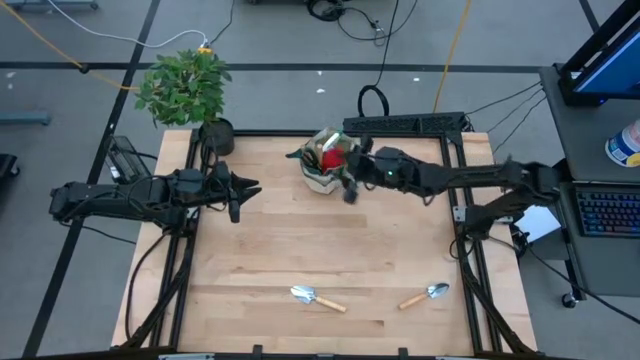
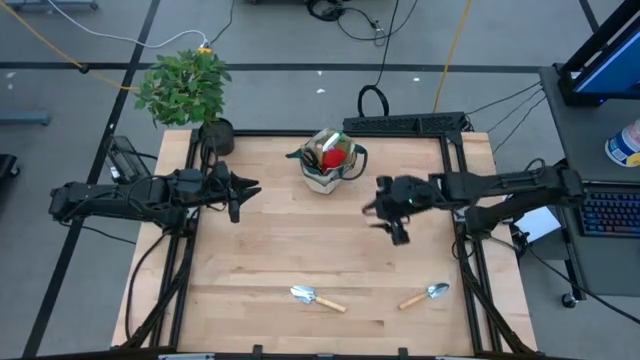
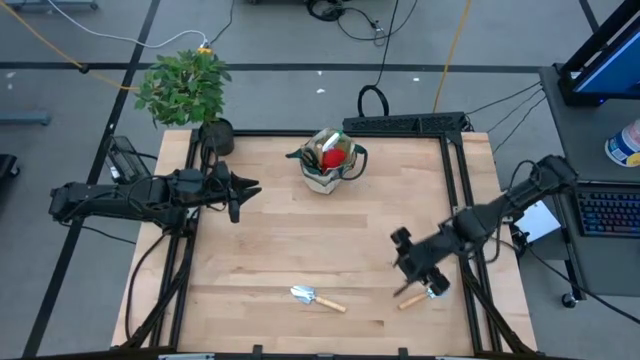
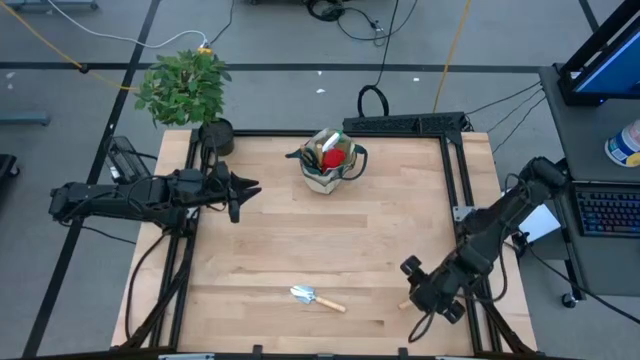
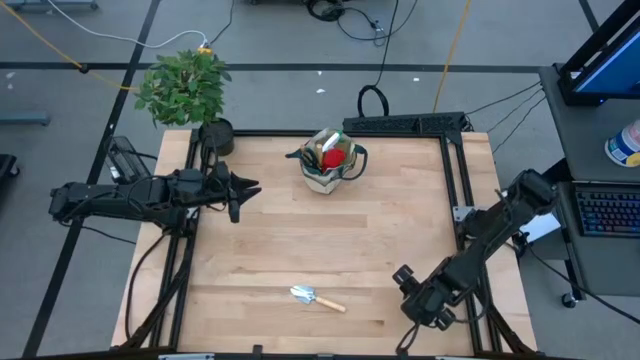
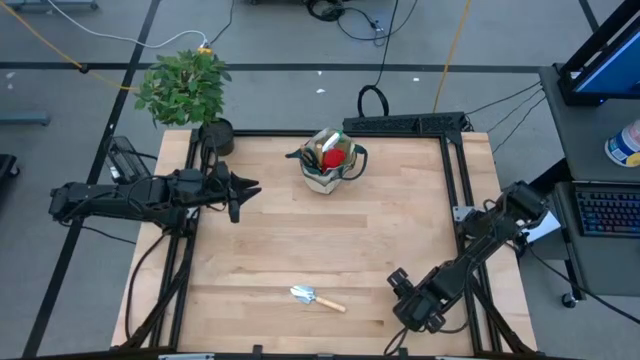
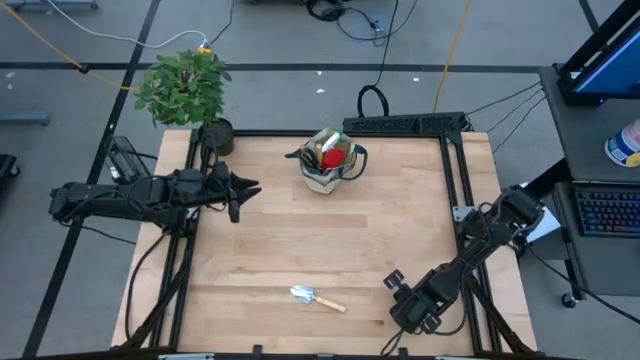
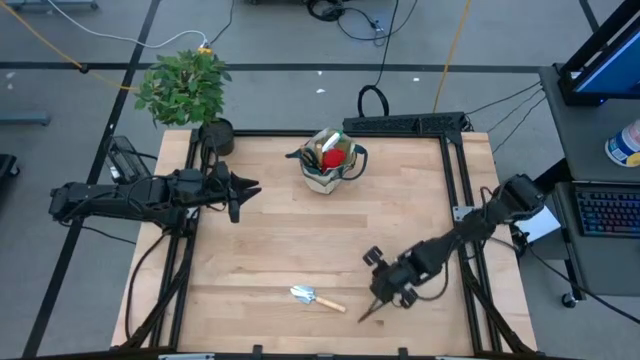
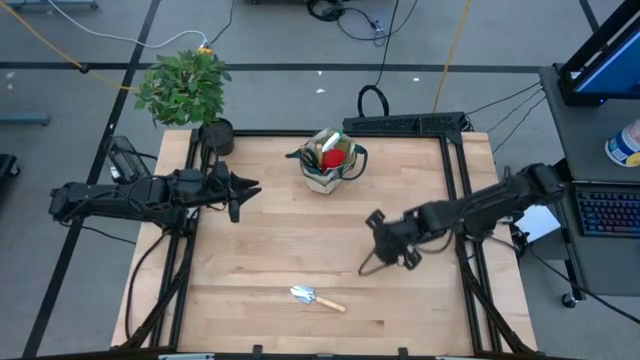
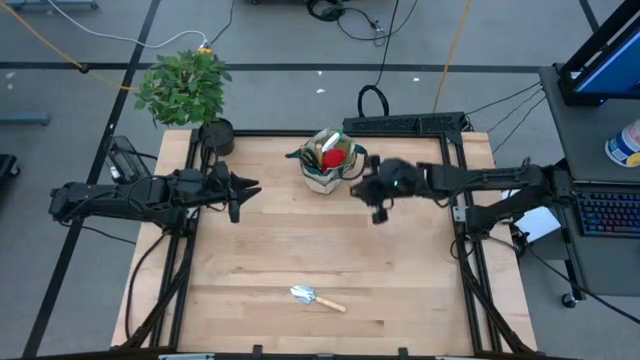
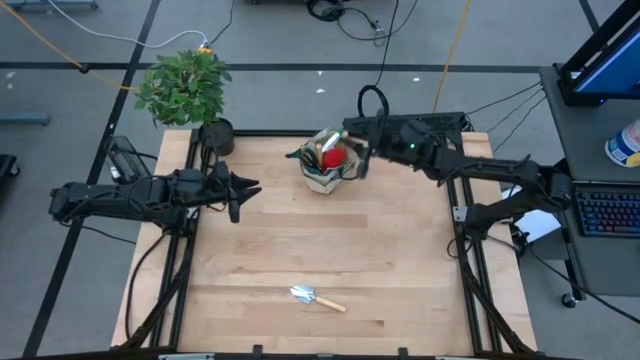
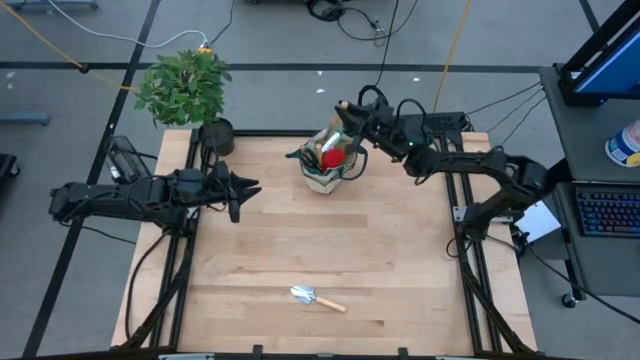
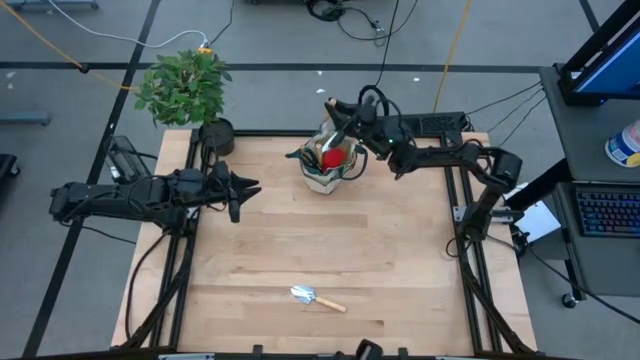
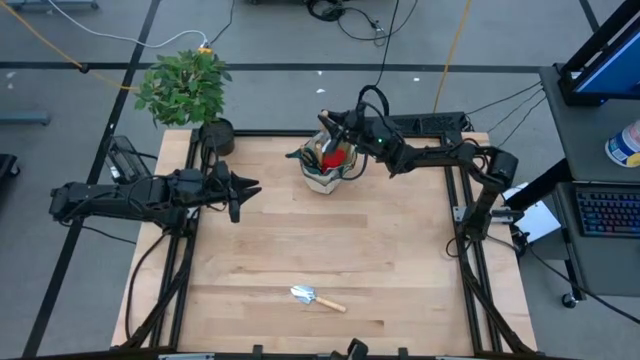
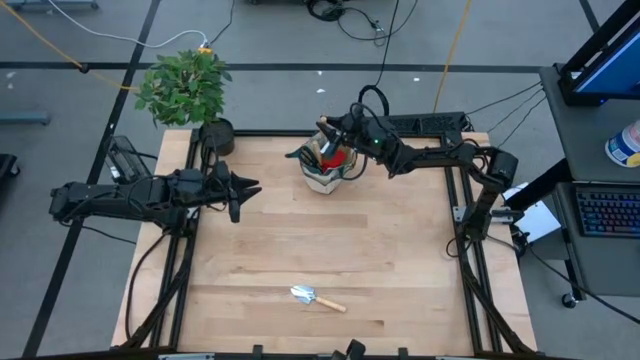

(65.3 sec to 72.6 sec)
Task: Pick & Place Garden tools in Gardening bag
Put the right hand trowel into the gardening tool bag

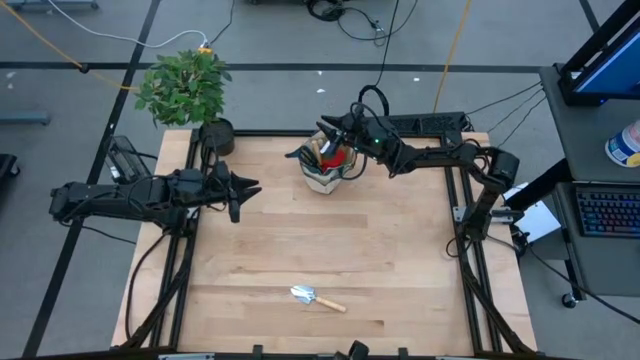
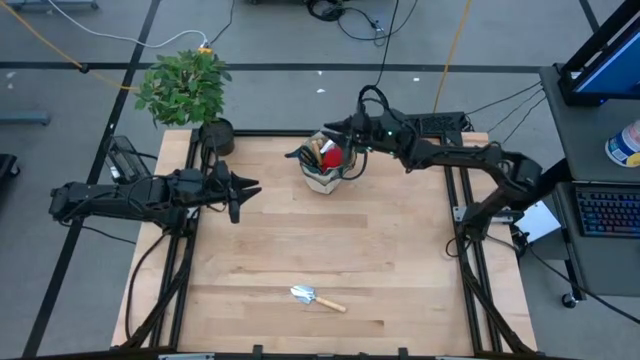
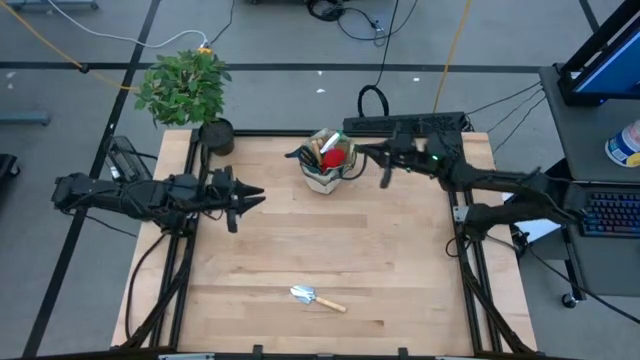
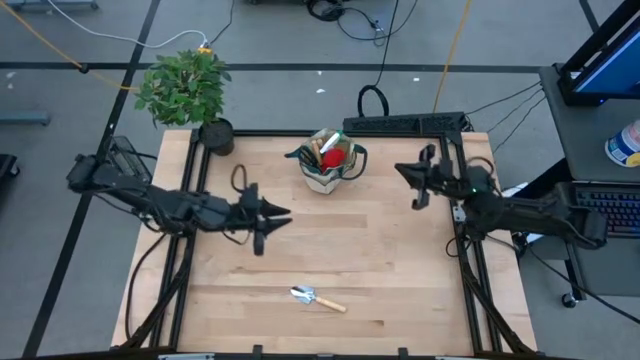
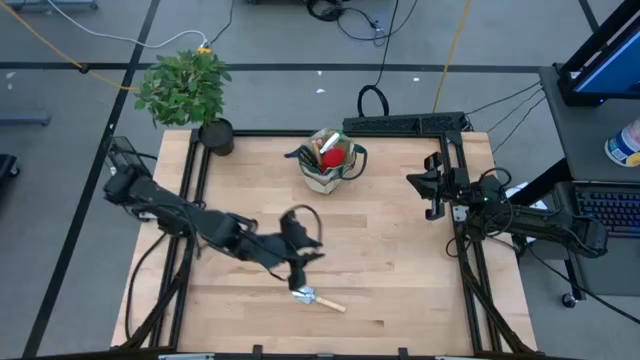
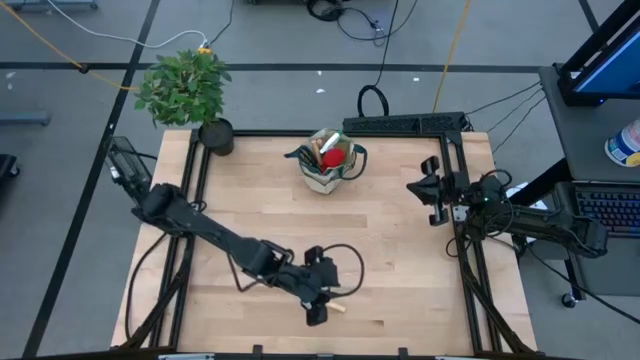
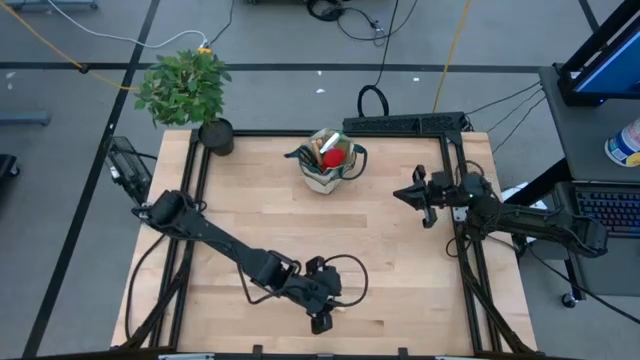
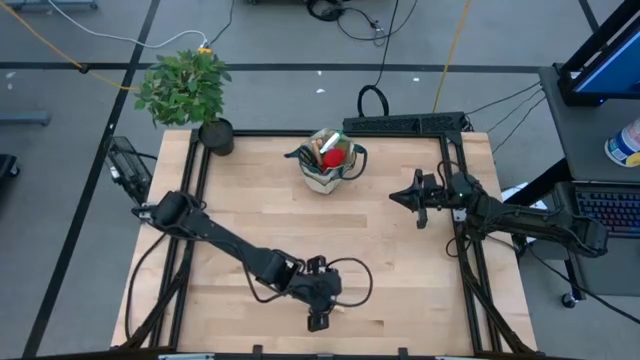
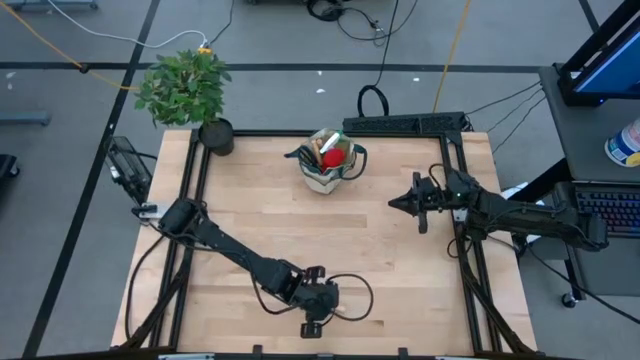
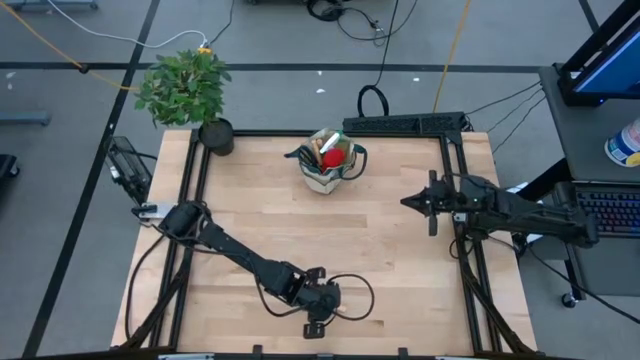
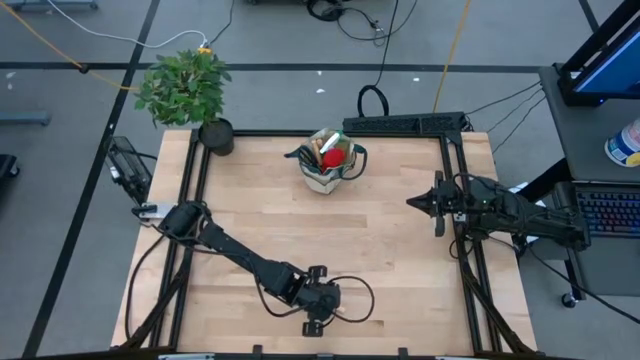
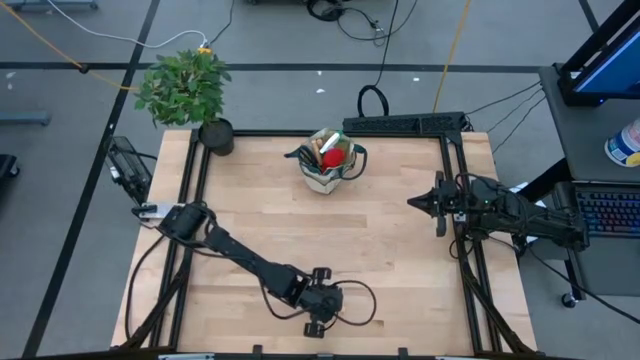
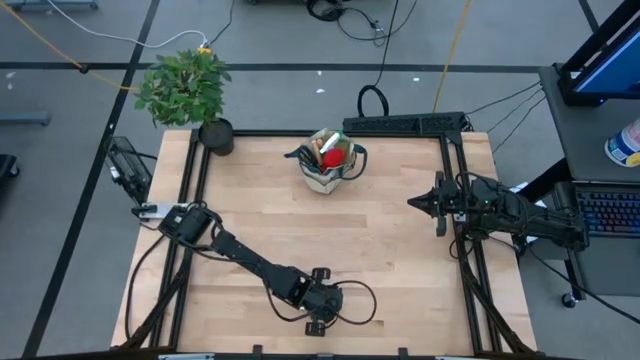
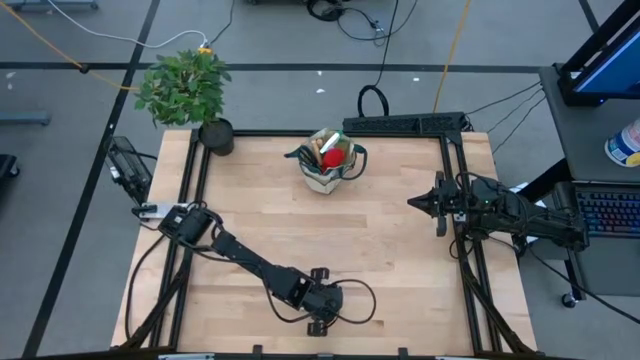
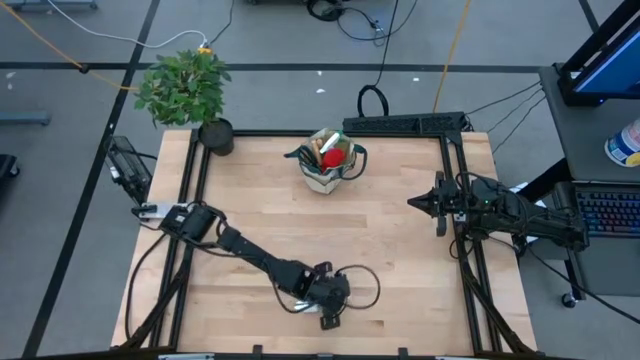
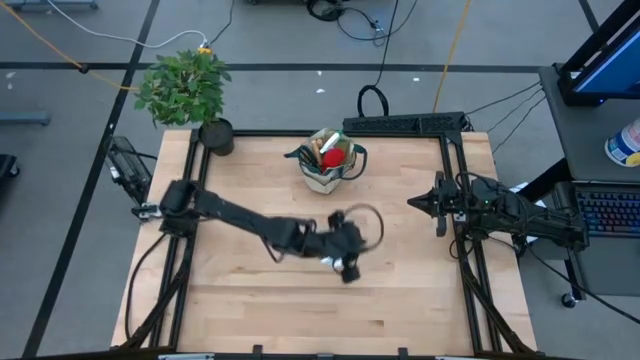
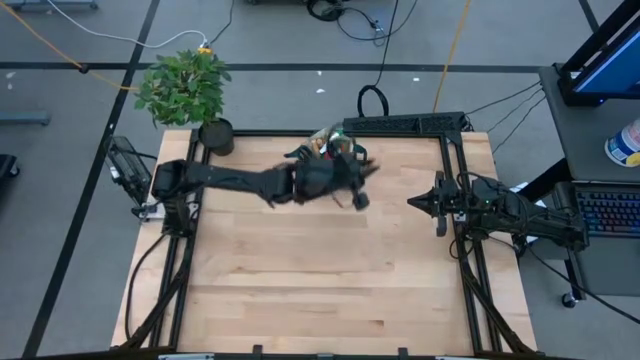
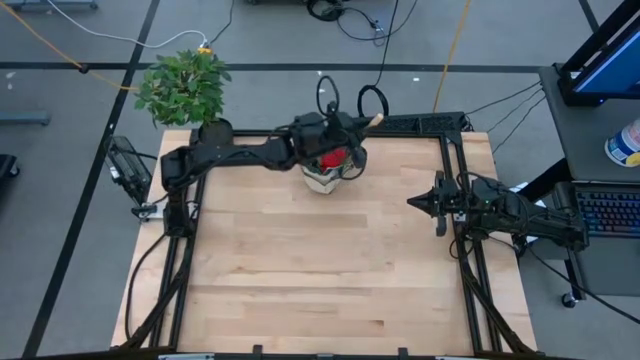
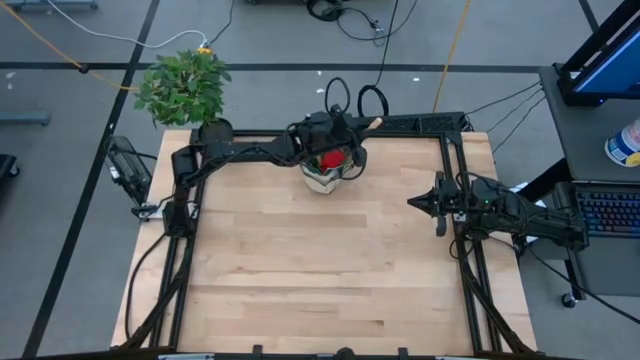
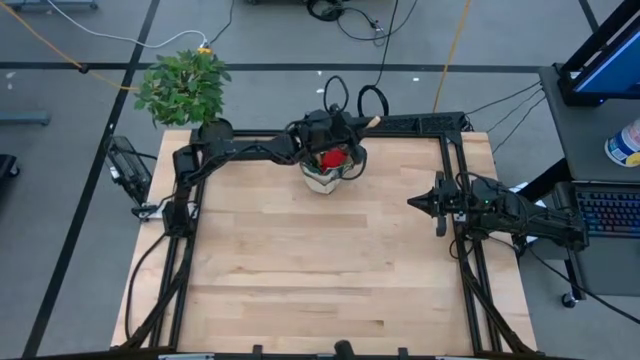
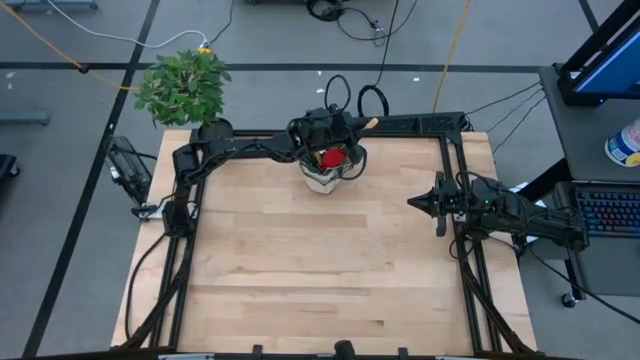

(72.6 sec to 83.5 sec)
Put the hand trowel into the gardening tool bag

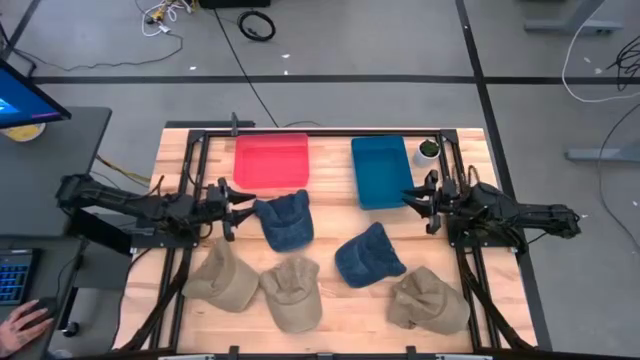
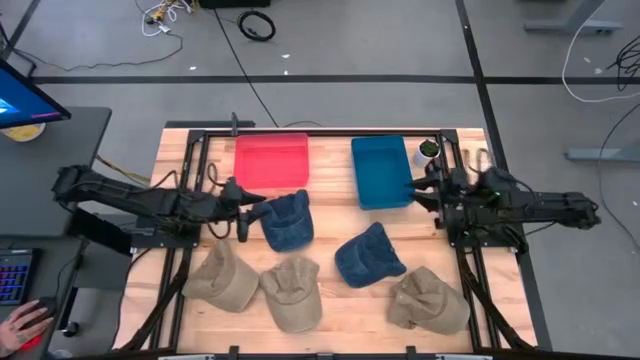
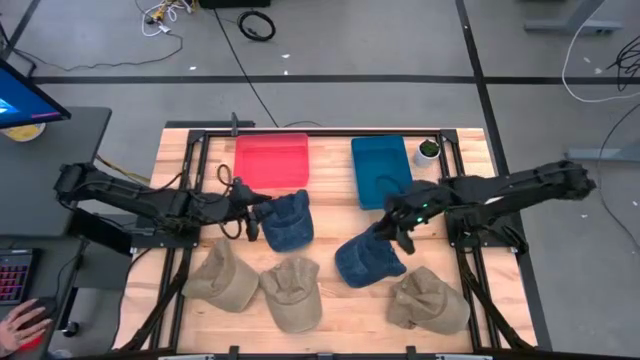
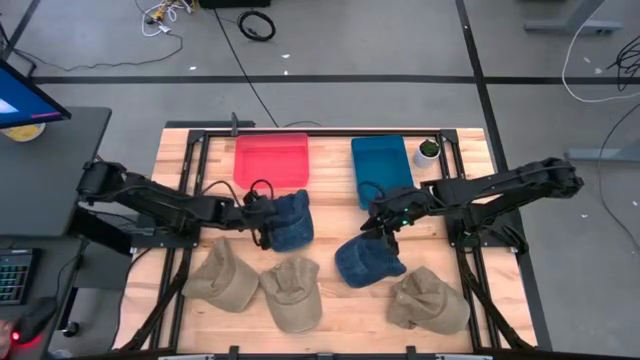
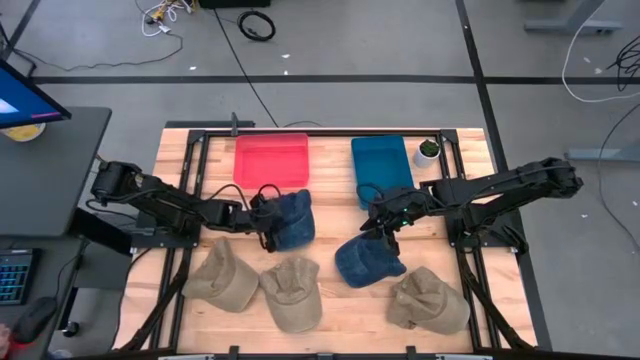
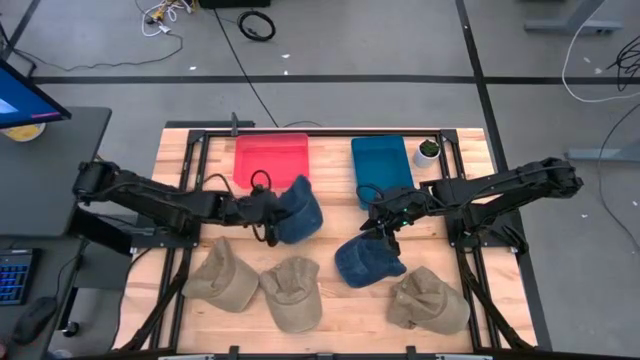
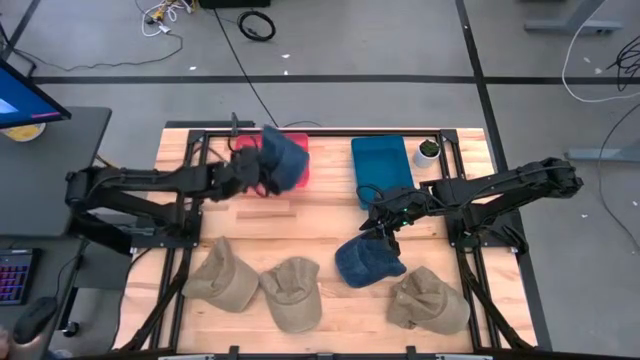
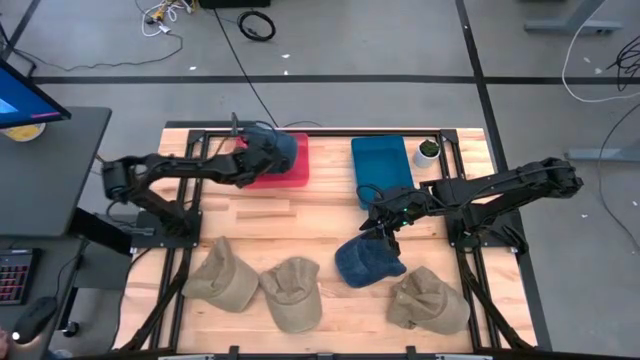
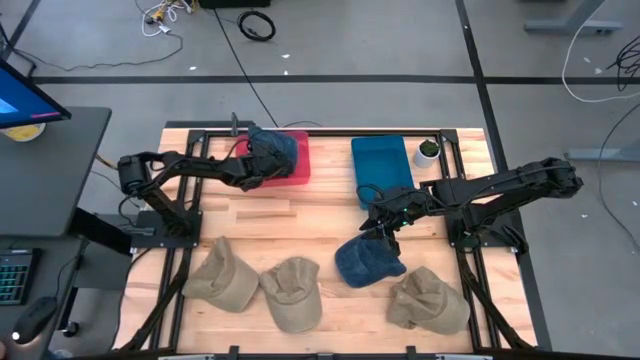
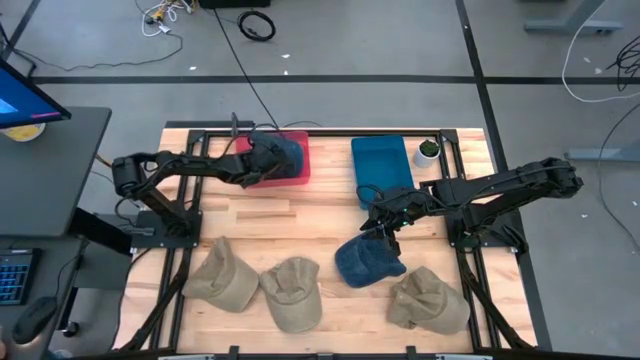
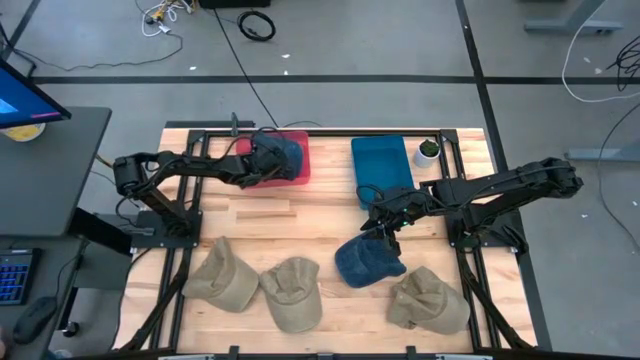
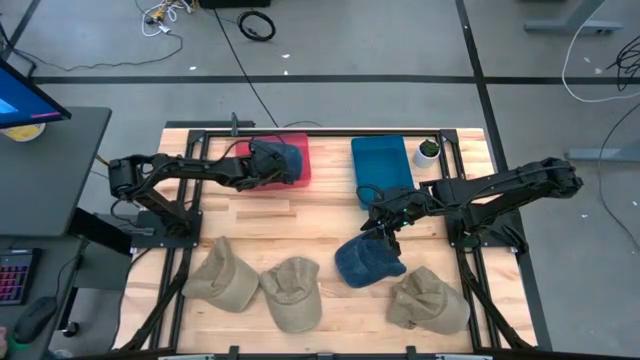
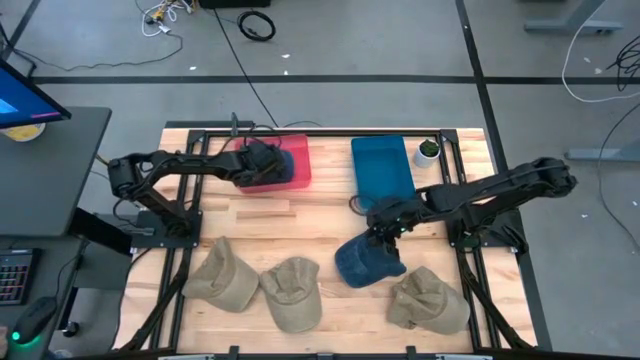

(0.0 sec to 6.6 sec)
Task: Pick & Place hat
Put the left blue cap into the red bin
